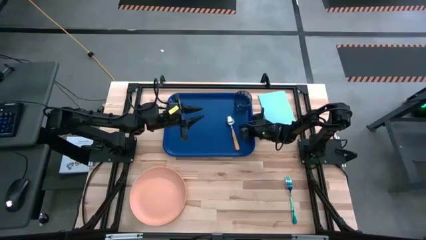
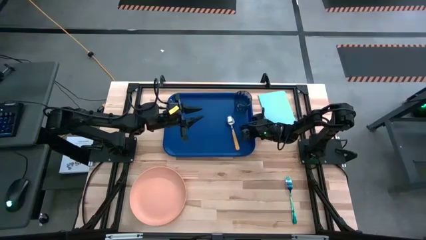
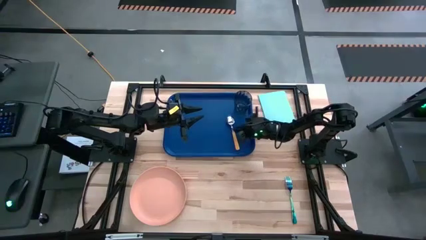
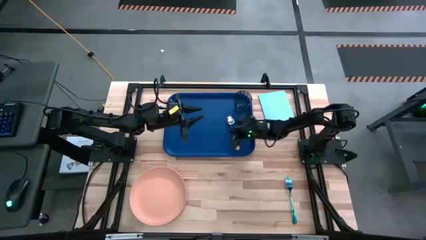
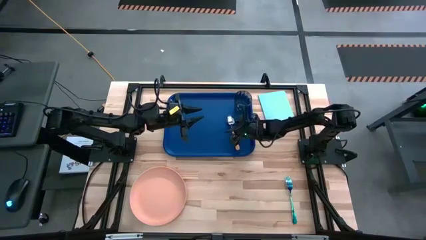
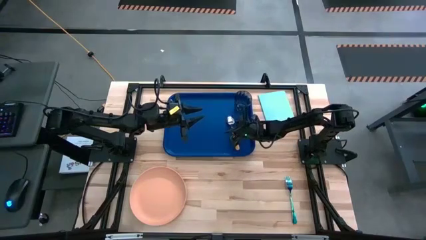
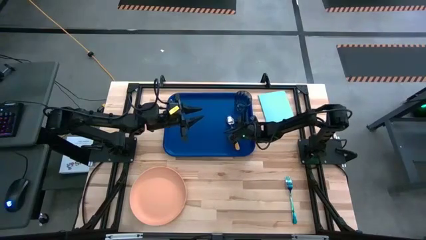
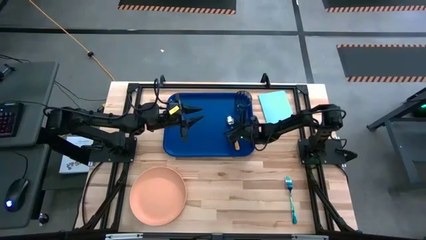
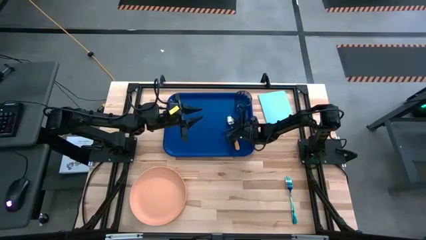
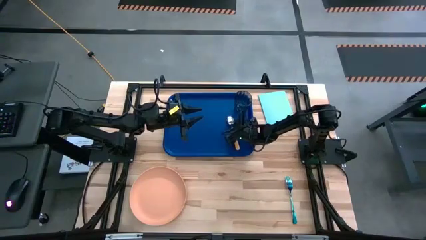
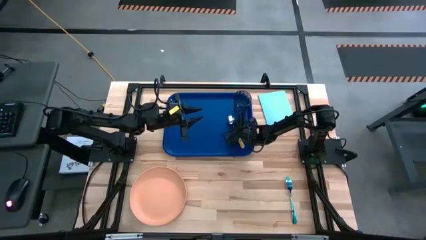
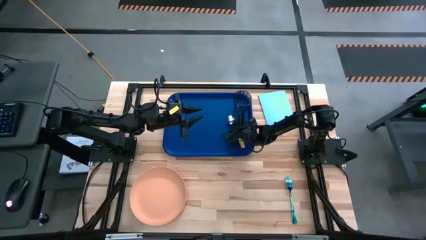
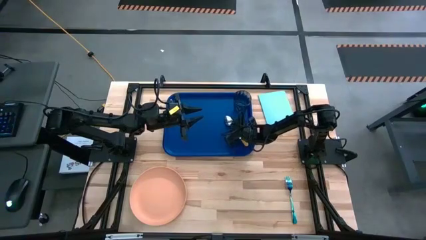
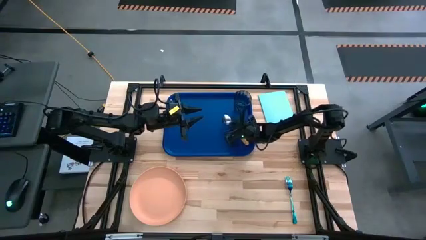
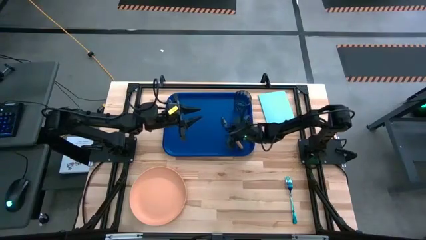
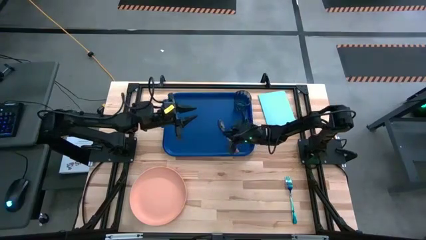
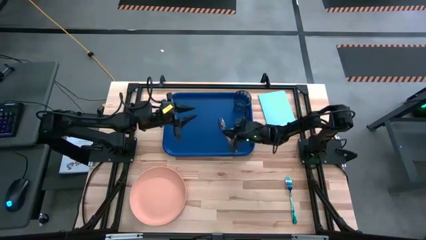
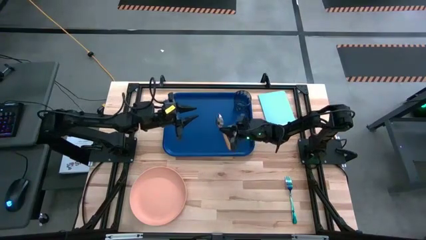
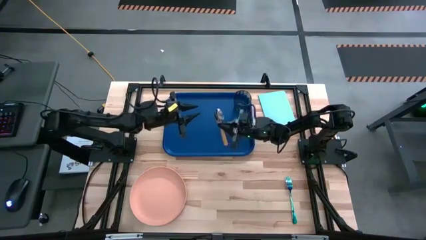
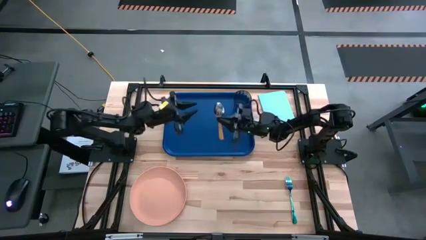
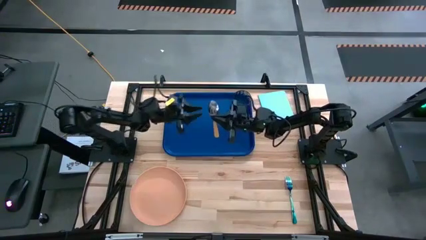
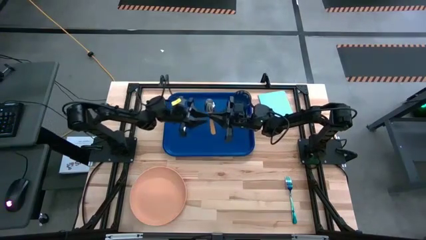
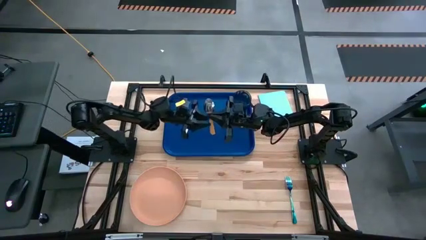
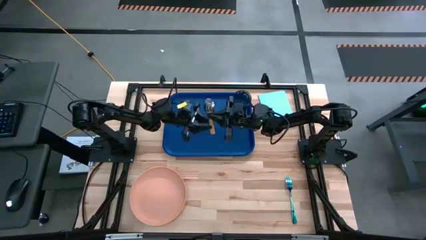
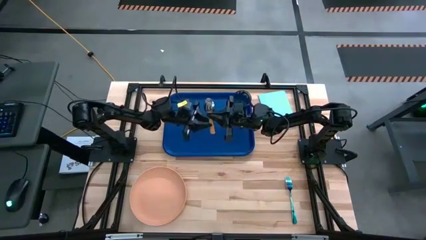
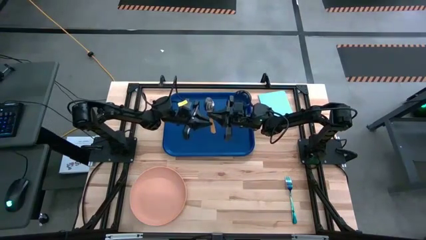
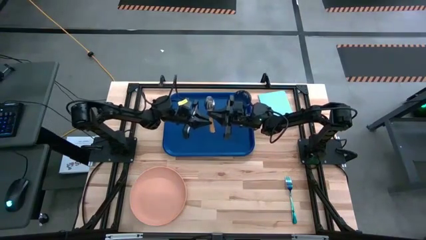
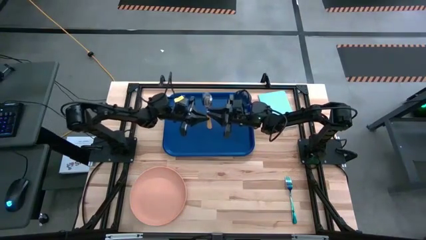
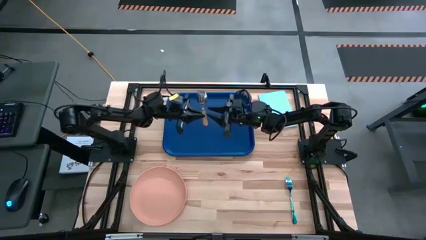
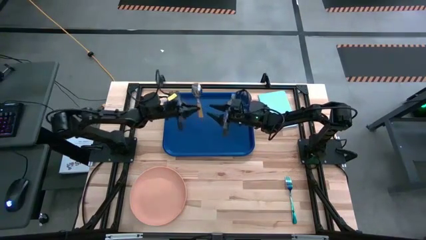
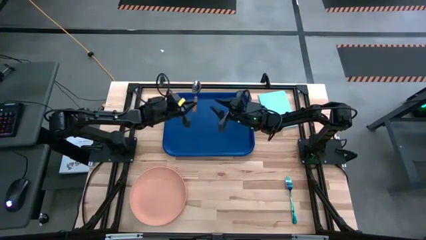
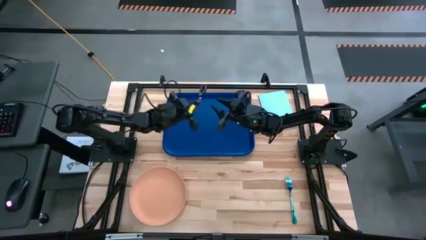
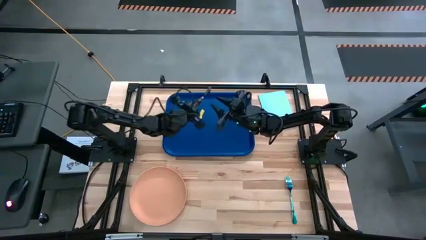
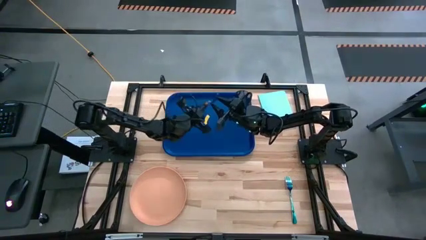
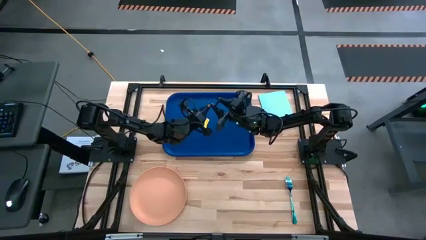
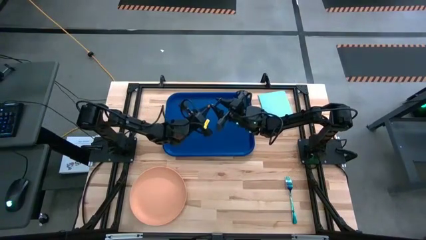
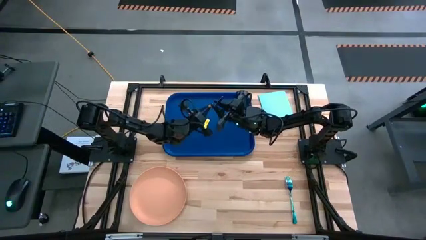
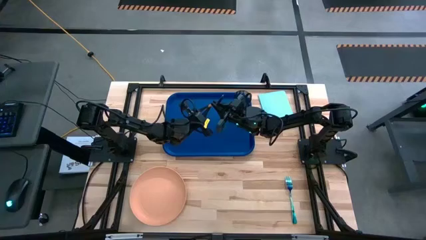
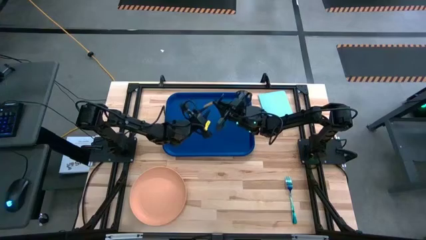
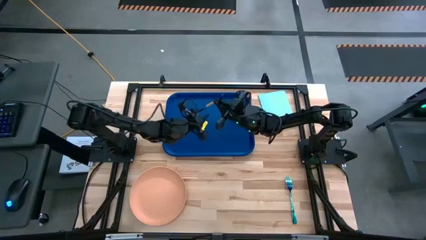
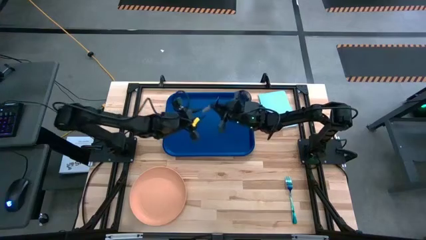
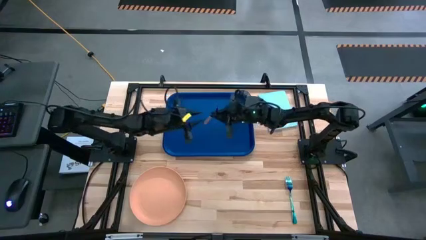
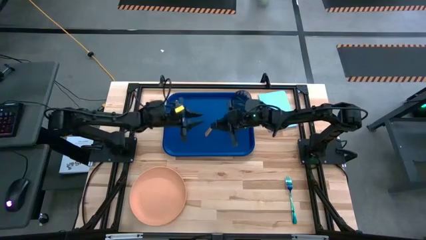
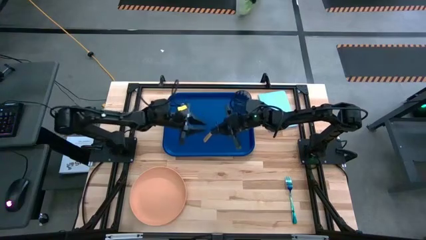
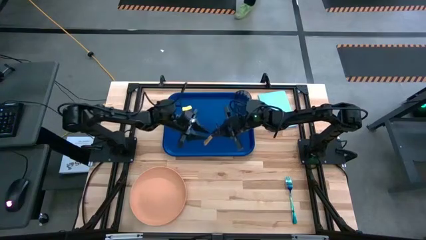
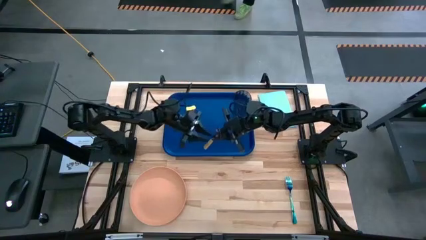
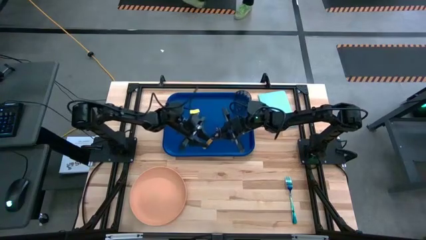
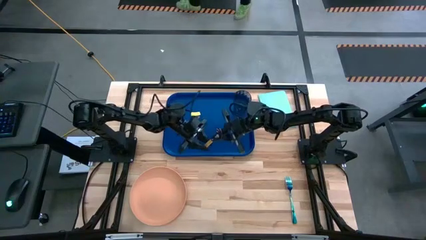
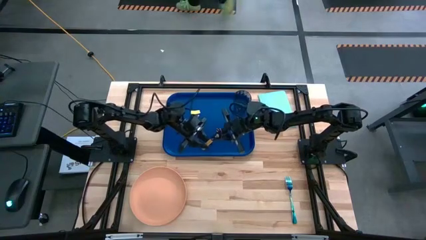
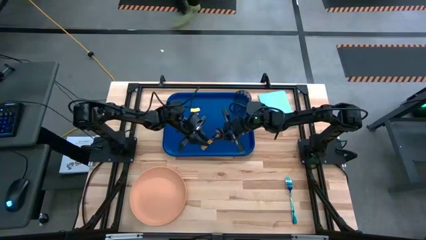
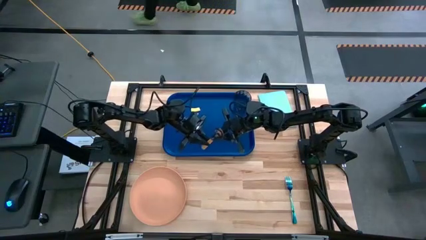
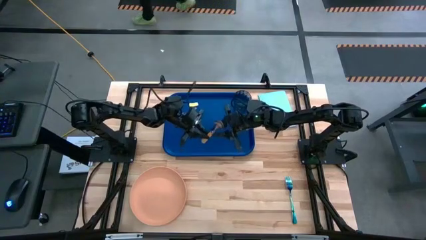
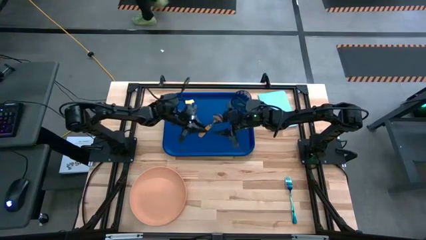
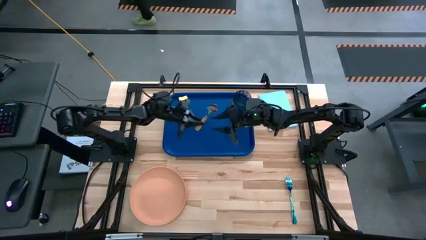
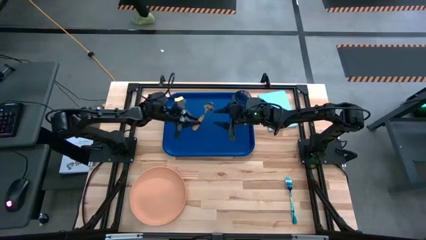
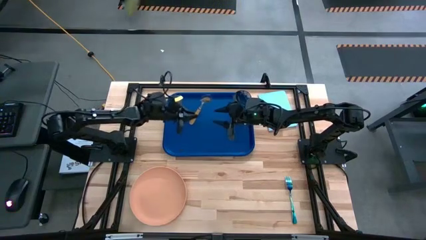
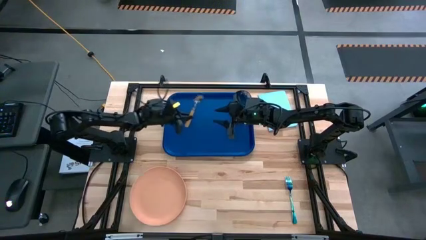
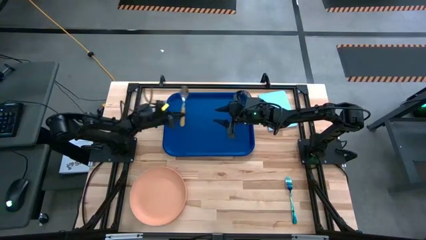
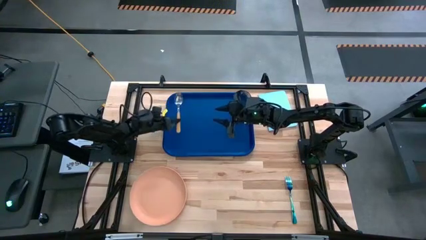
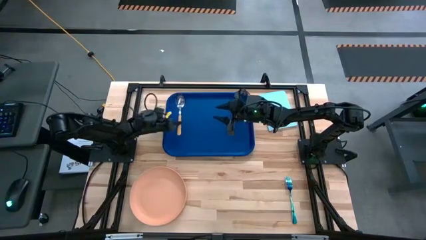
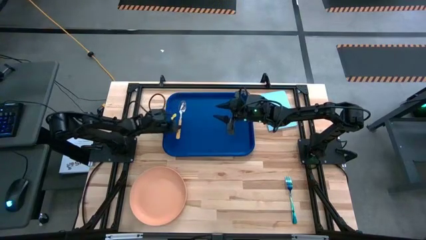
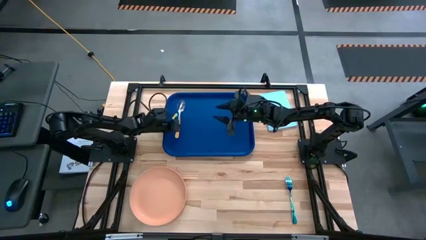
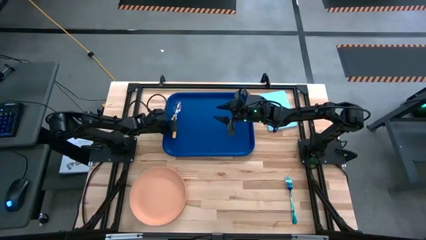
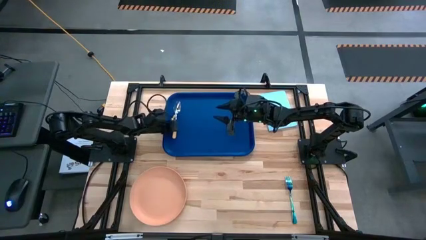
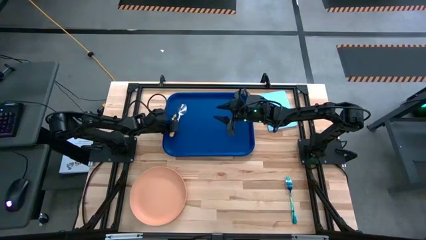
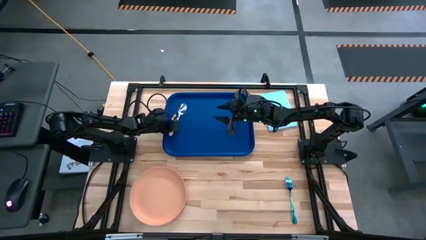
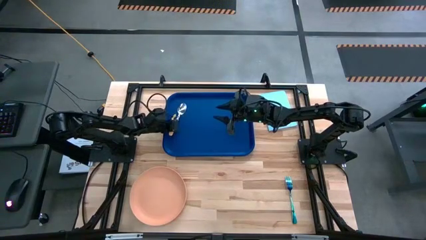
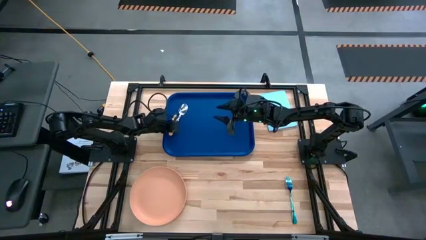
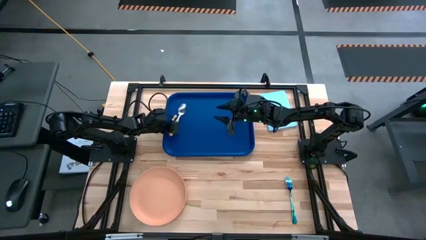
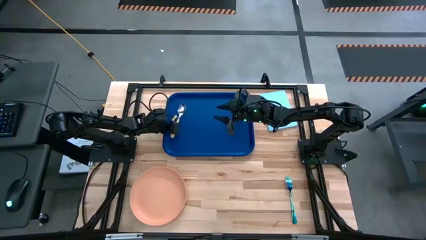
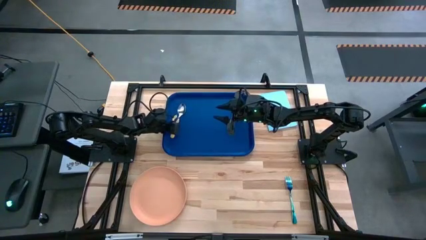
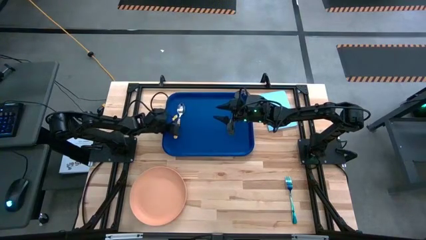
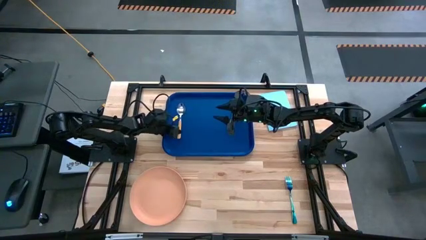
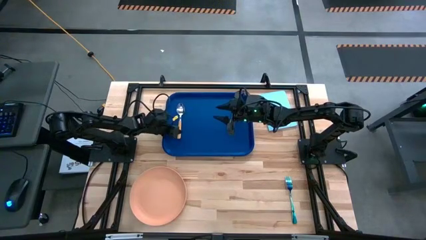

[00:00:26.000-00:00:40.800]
Task: Pick and place plate/cup/fork/spoon on tray
Put the spoon to the left of the blue serving tray
